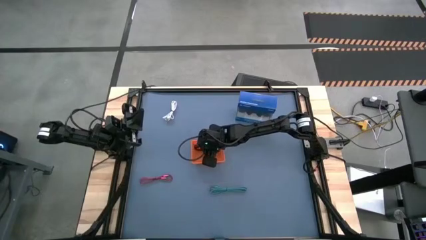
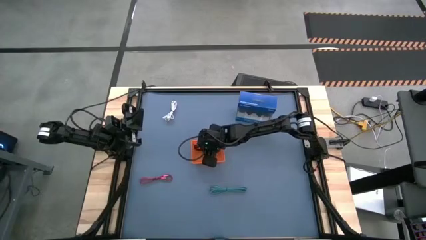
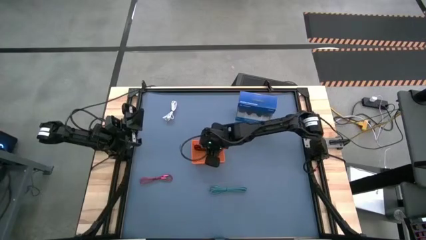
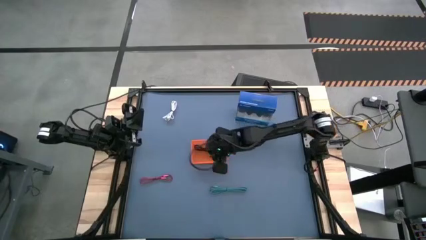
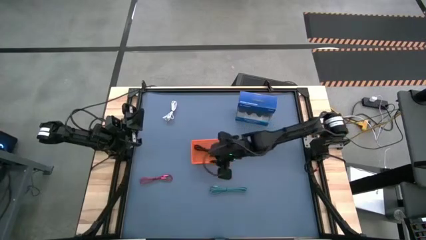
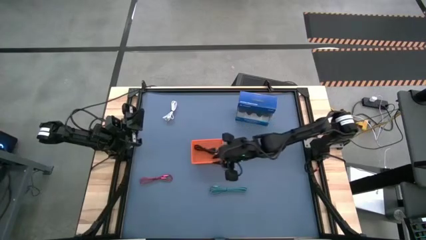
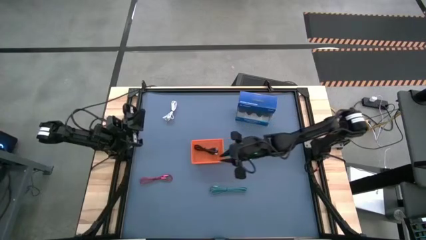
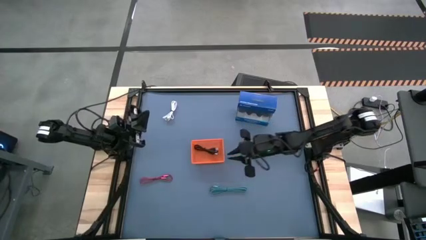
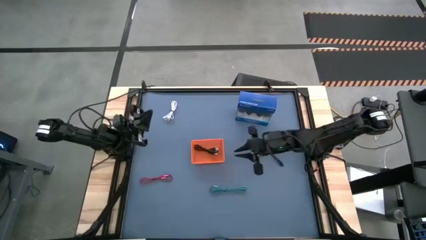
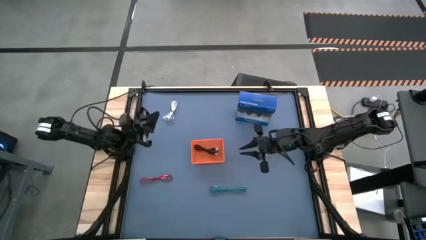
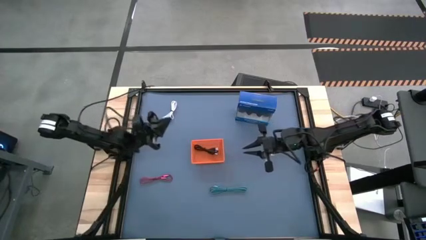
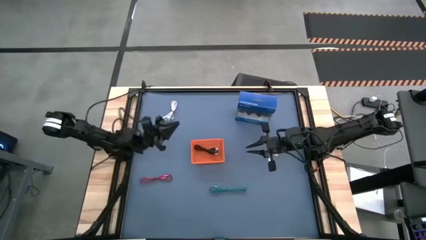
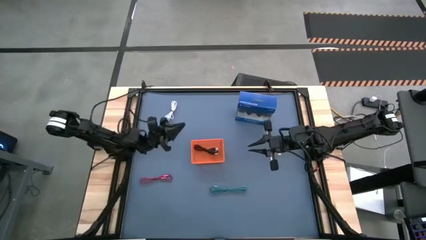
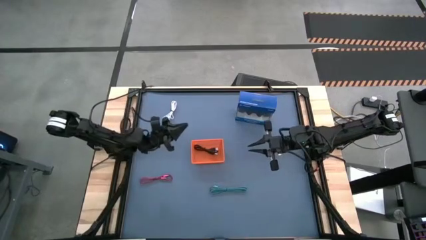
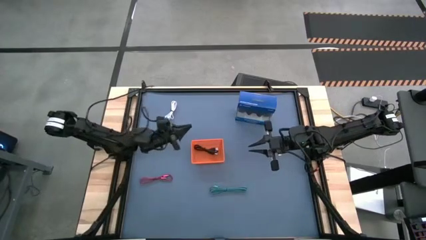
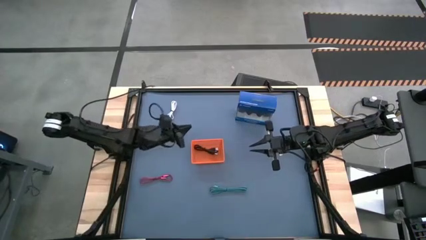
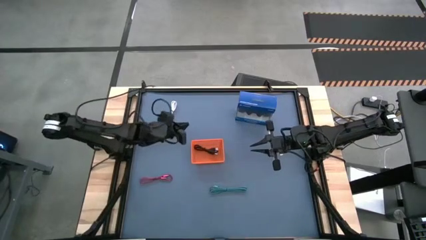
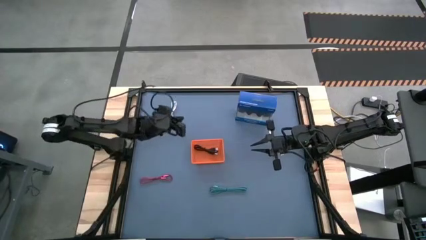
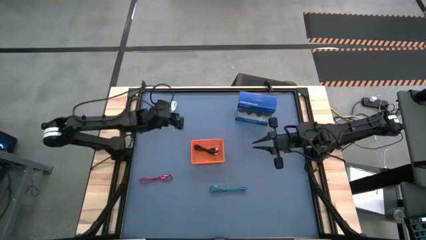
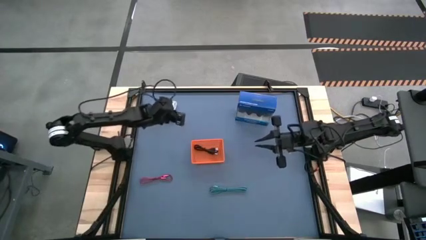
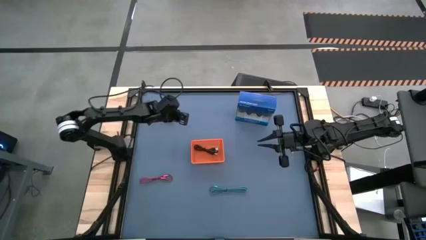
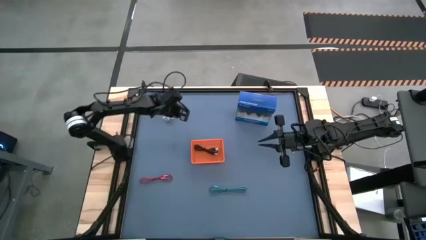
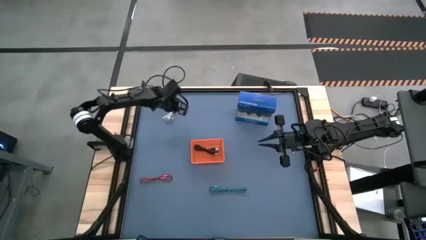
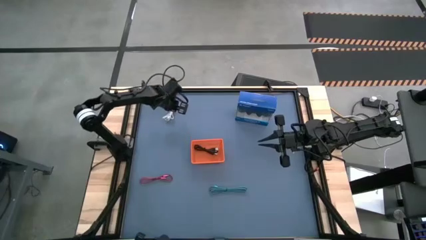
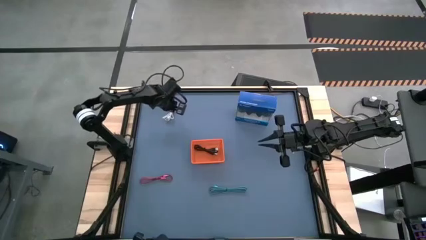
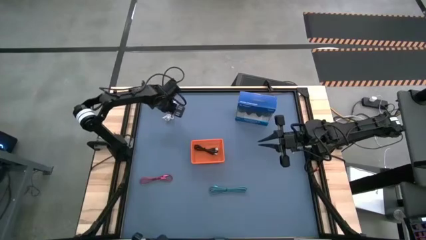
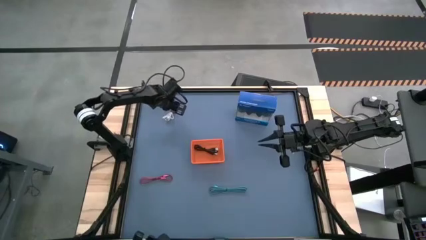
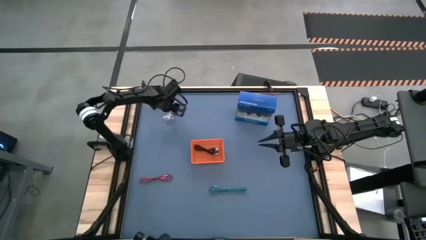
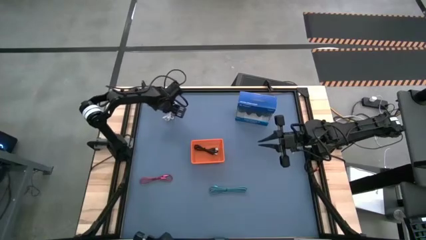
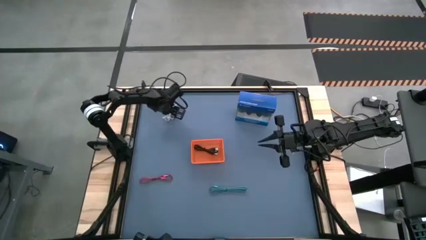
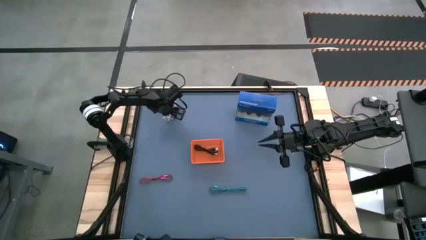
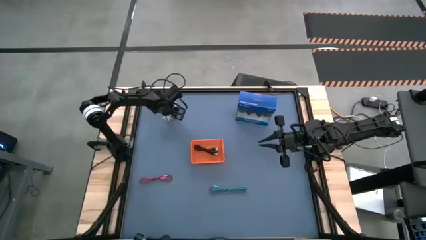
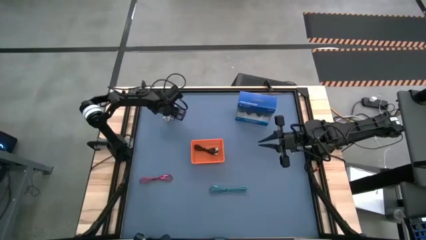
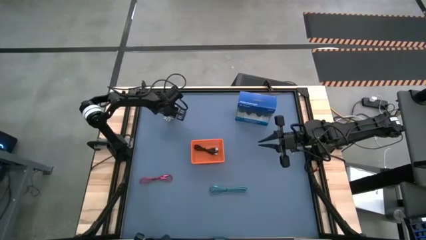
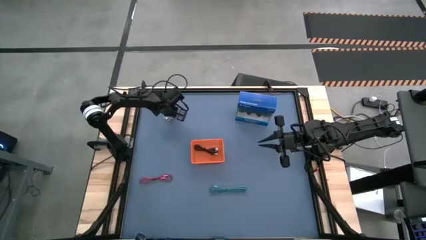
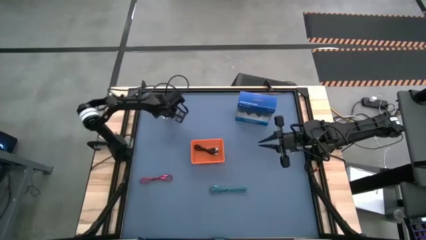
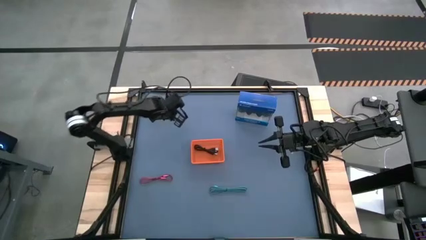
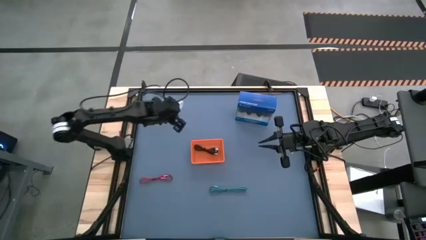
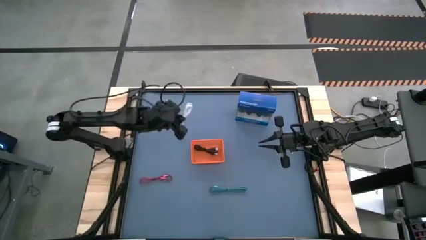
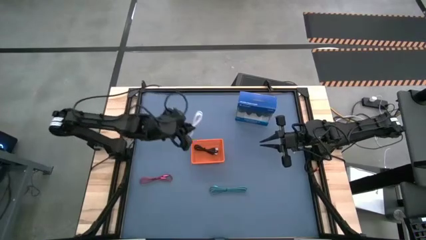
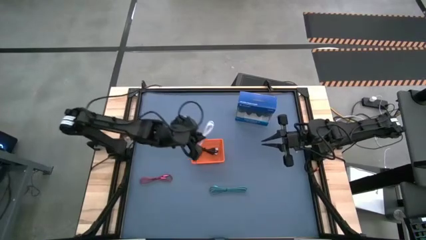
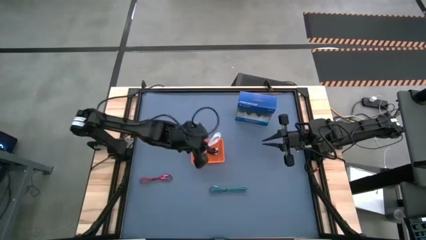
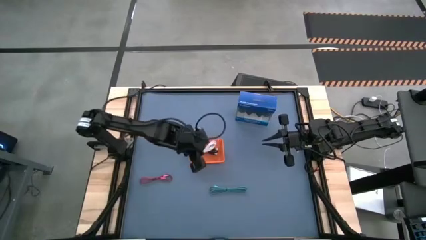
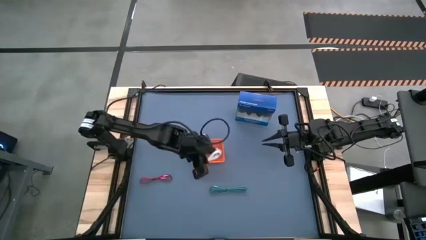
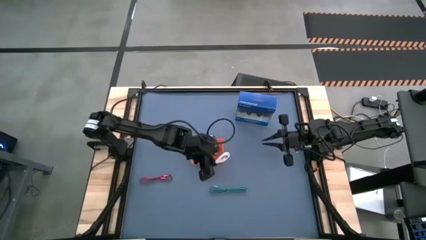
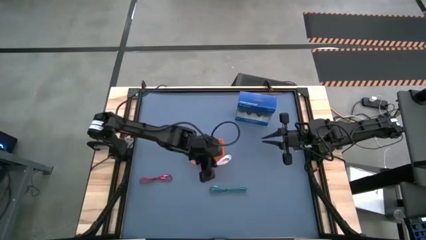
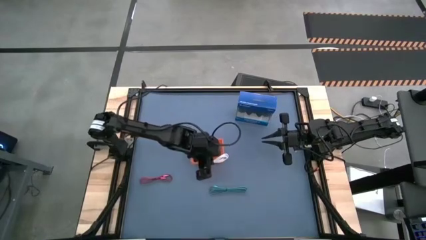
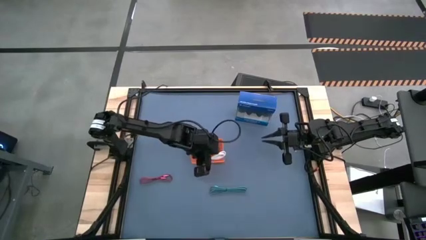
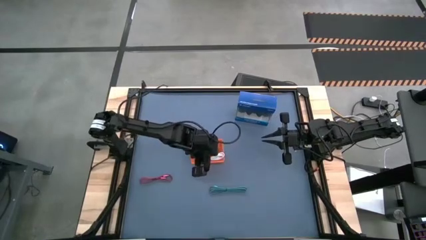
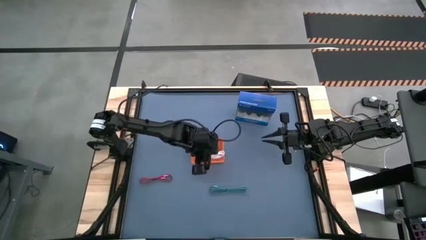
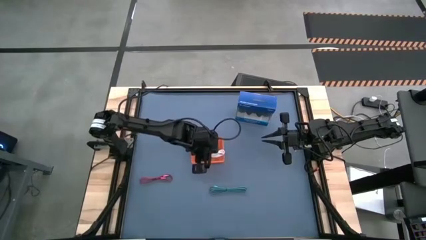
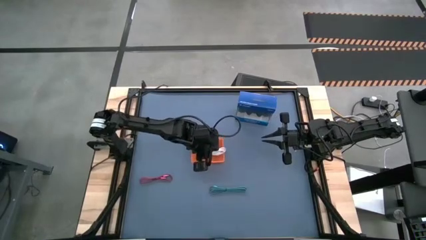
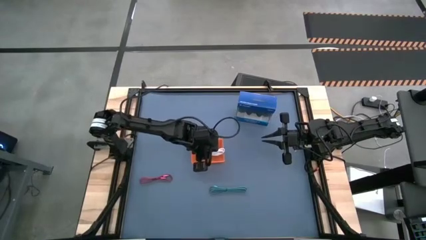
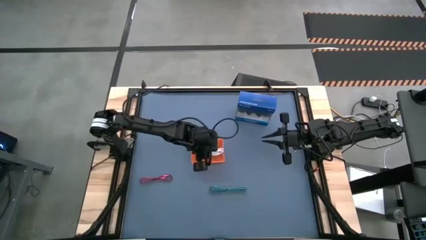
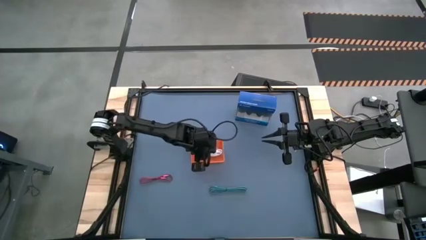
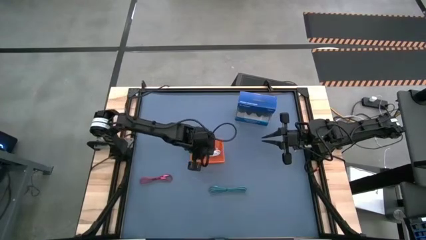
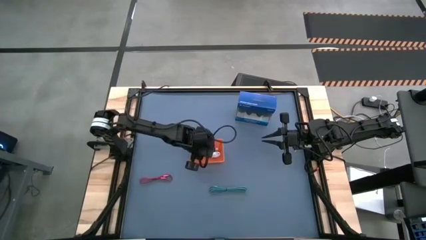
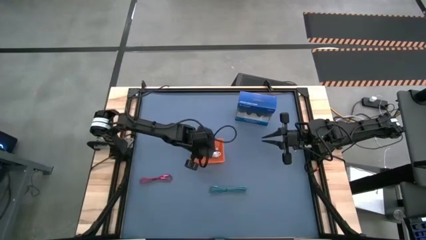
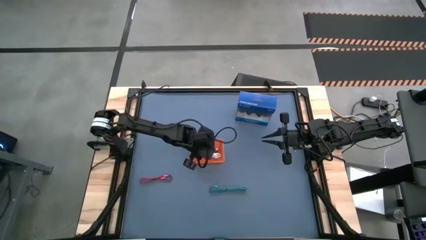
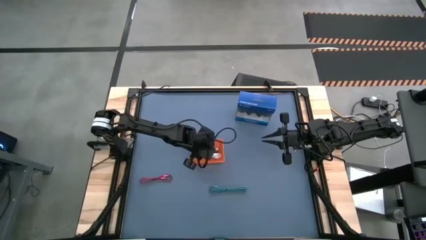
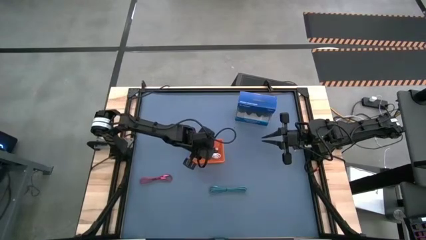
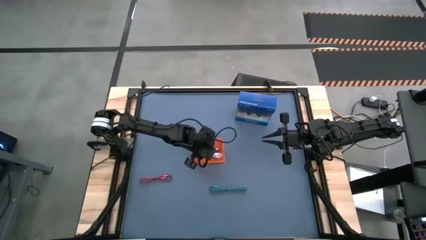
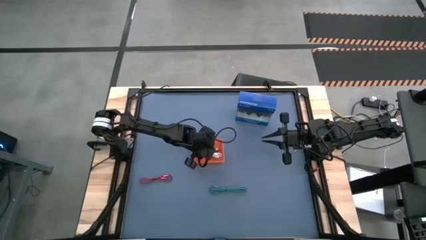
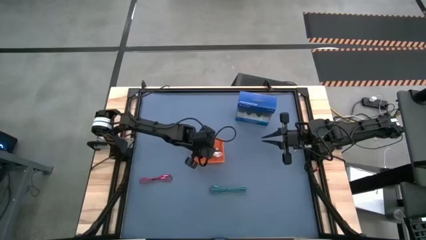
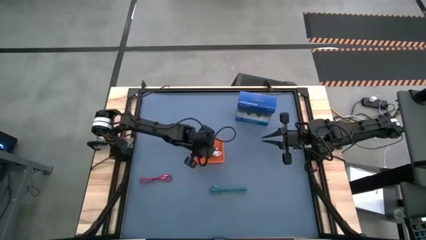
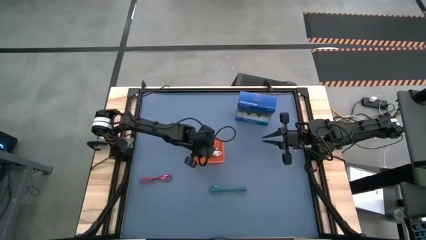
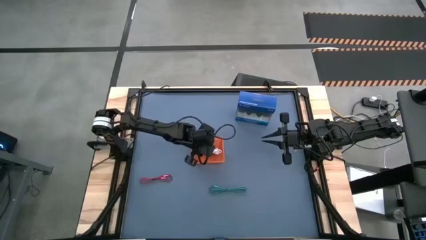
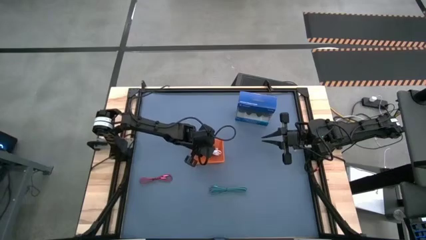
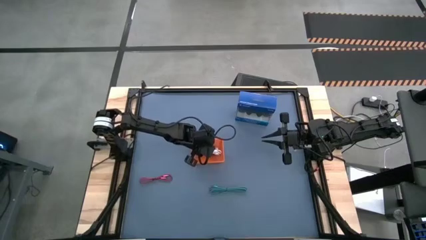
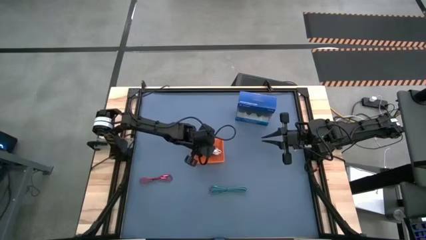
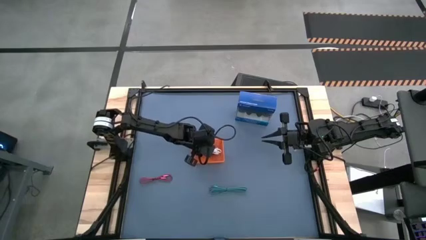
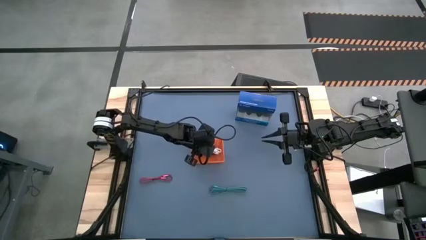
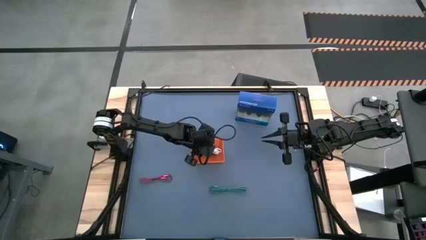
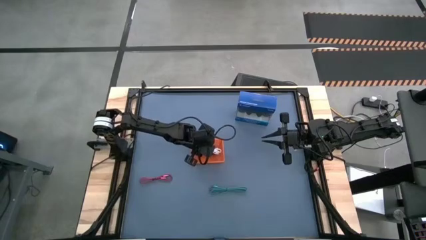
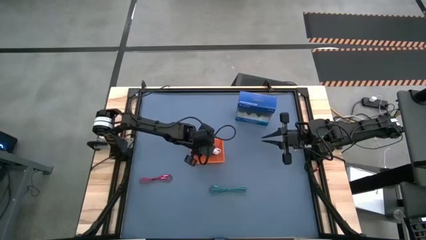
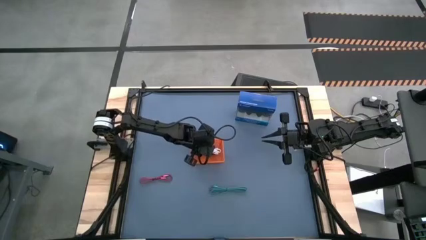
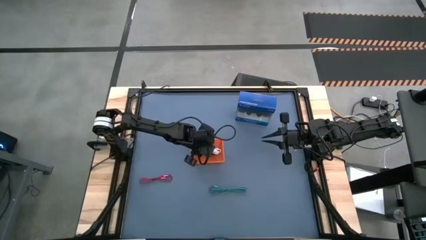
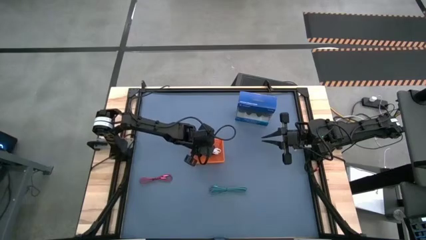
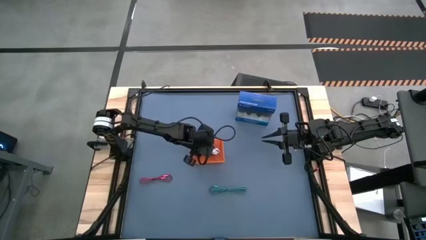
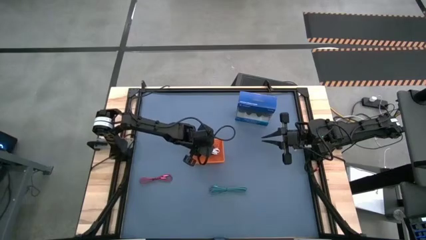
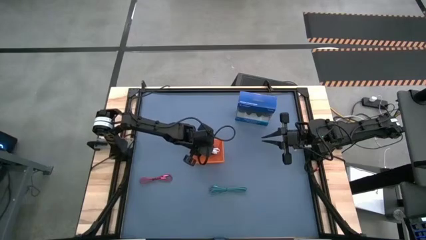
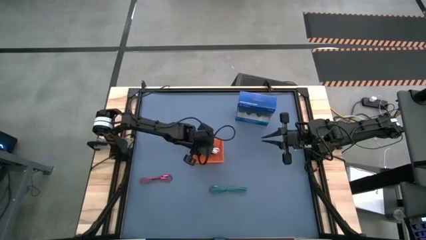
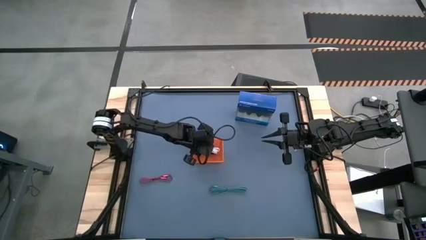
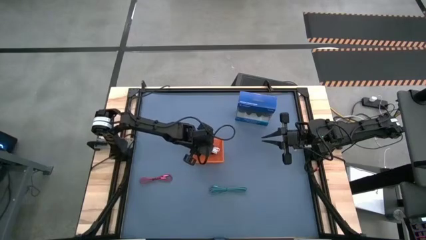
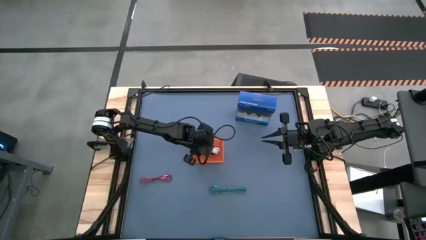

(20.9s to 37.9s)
Task: Pick and place USB-C Cables
Put the white charger cable into the orange bin
